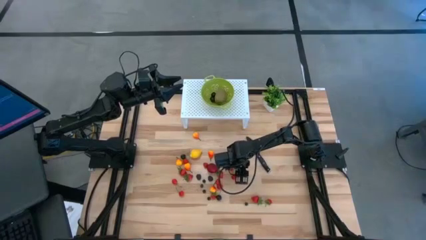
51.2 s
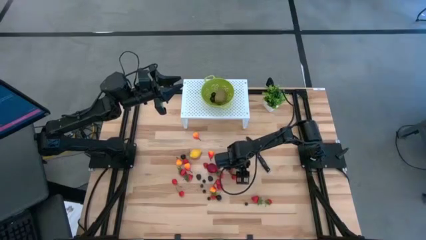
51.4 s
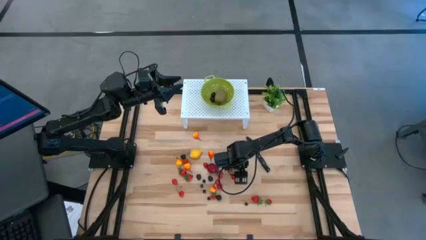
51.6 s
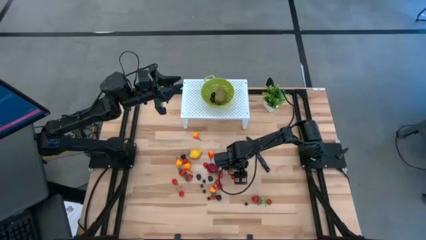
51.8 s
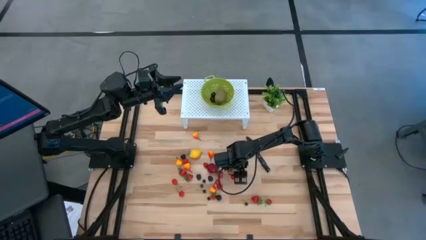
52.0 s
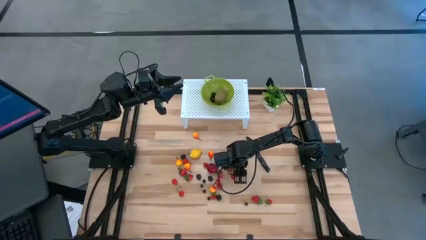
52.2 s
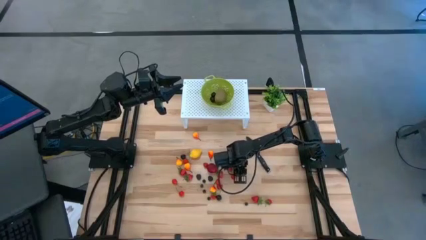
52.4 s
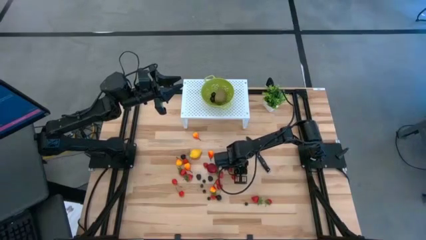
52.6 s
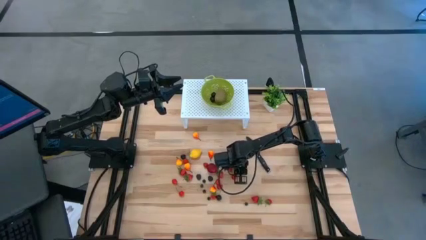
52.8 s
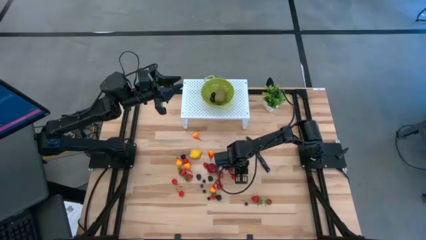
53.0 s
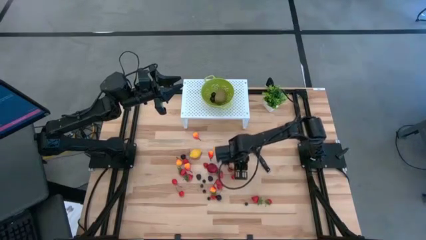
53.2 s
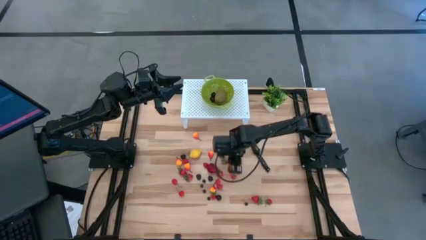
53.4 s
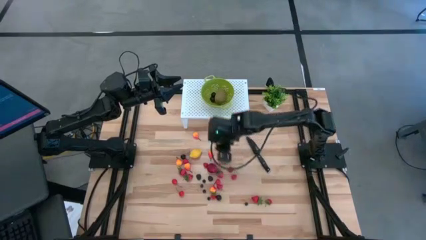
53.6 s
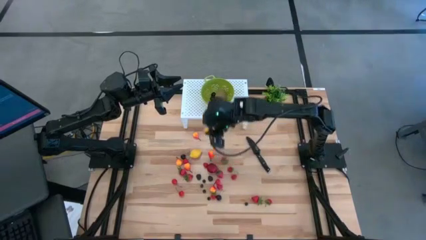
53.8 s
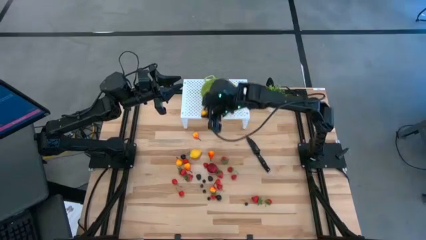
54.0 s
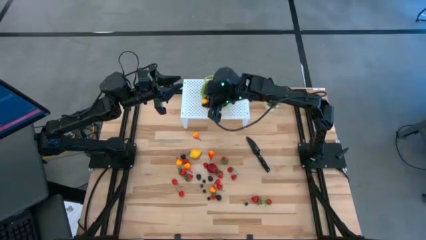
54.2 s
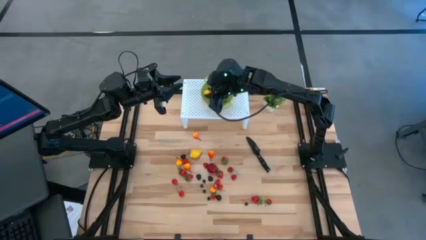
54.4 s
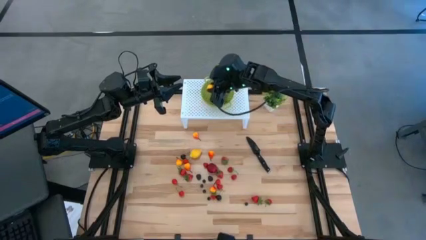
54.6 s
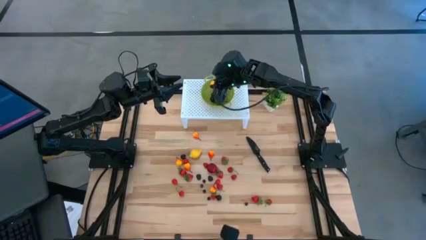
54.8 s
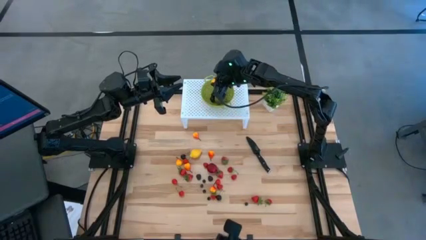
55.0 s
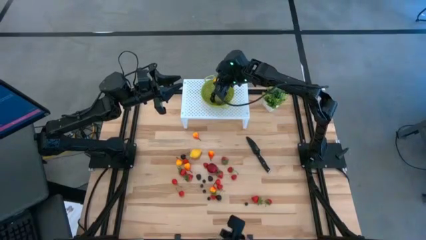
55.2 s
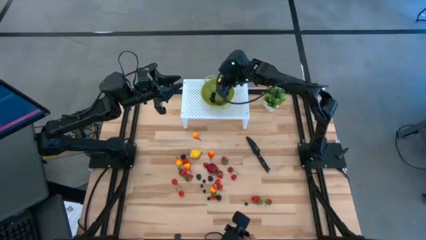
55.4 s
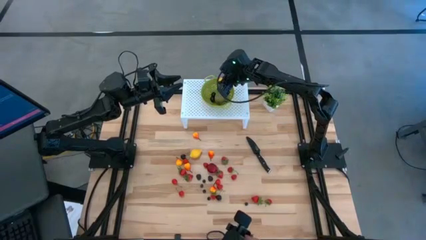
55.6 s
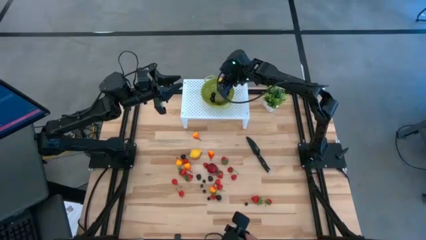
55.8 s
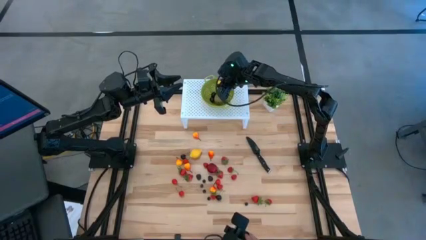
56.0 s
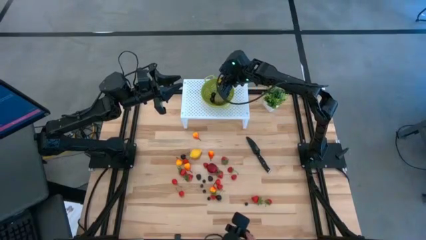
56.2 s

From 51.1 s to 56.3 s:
Task: Pick & Place Fruit
Put the yellow peach into the green strainer bowl

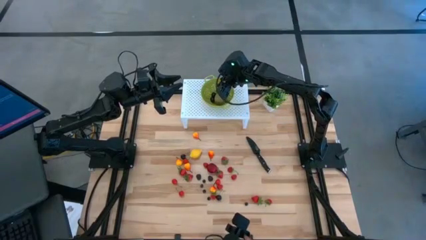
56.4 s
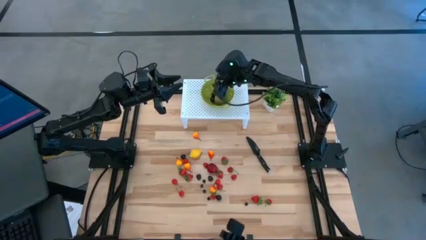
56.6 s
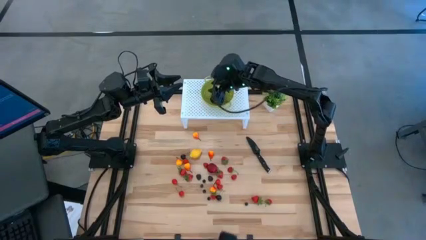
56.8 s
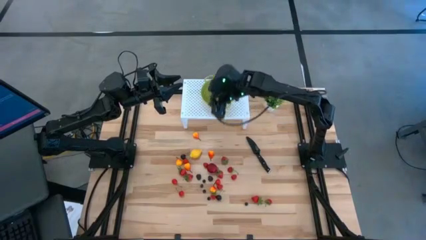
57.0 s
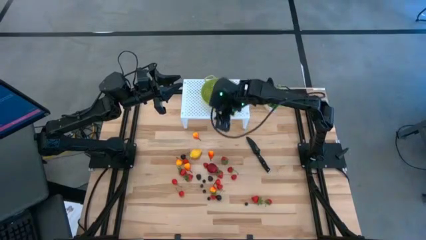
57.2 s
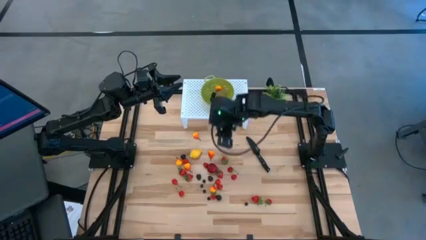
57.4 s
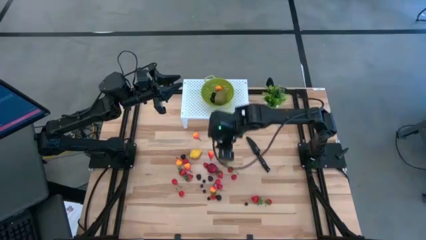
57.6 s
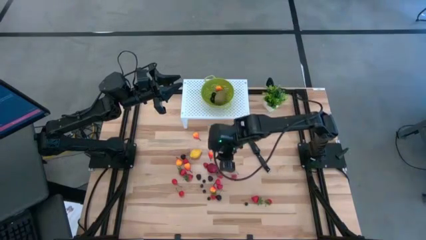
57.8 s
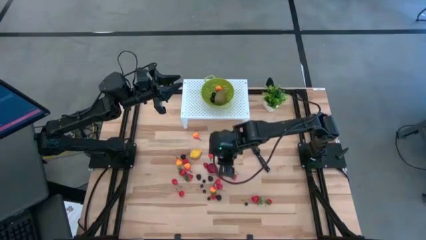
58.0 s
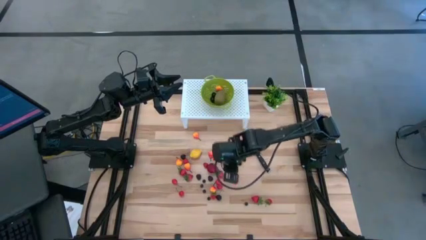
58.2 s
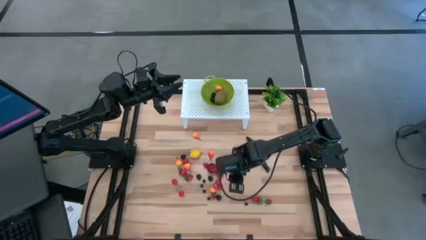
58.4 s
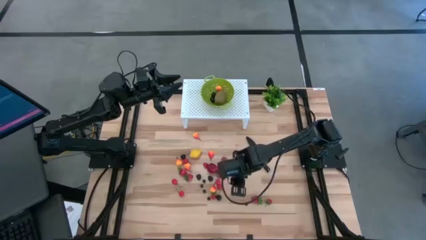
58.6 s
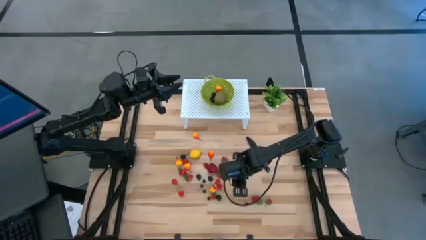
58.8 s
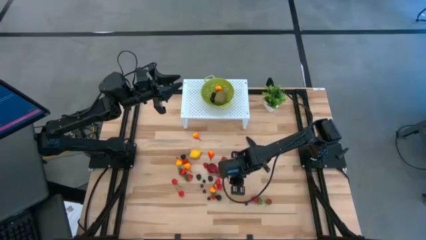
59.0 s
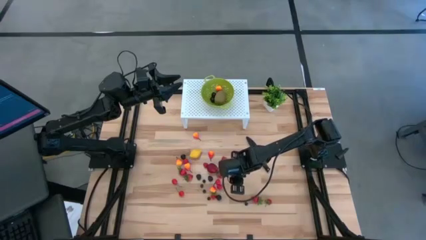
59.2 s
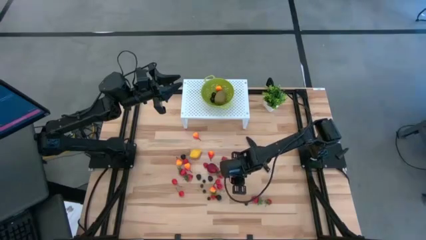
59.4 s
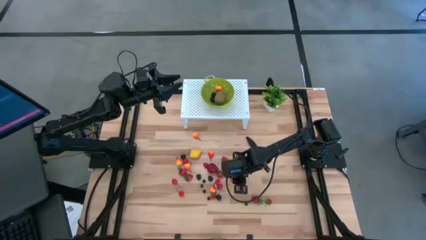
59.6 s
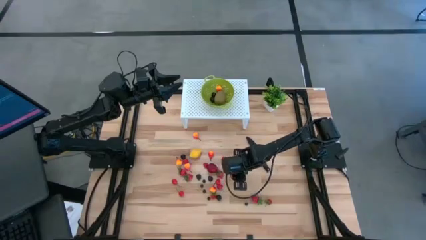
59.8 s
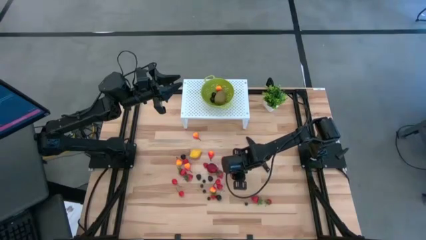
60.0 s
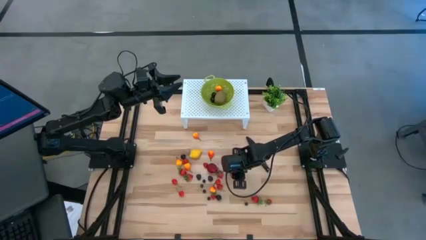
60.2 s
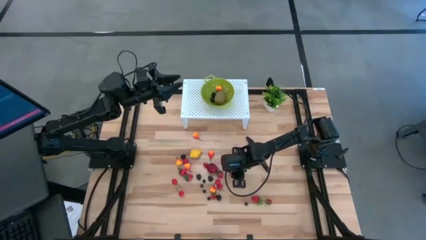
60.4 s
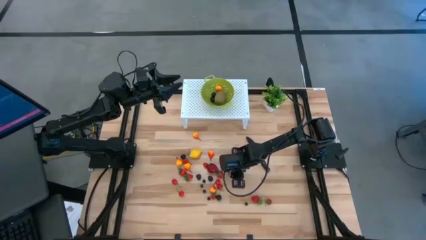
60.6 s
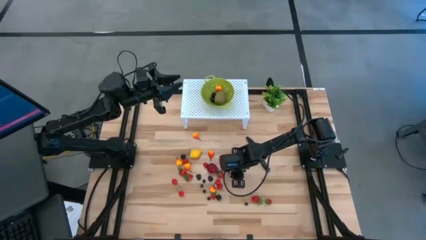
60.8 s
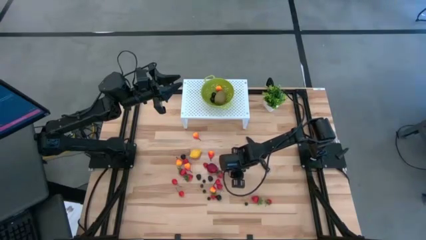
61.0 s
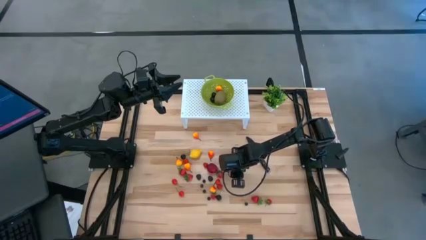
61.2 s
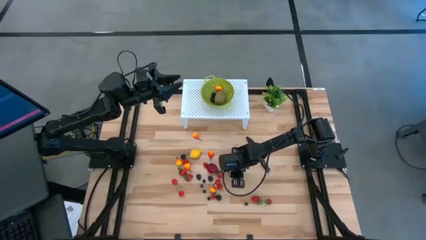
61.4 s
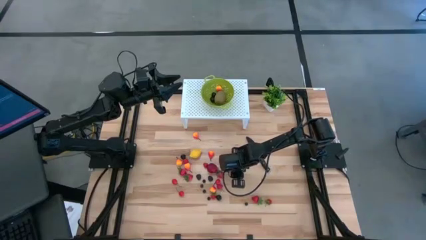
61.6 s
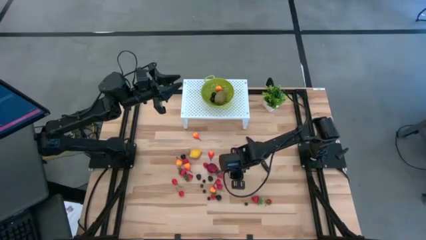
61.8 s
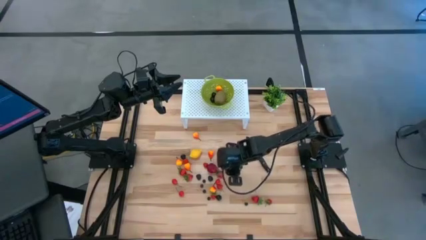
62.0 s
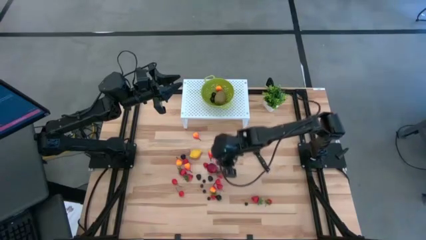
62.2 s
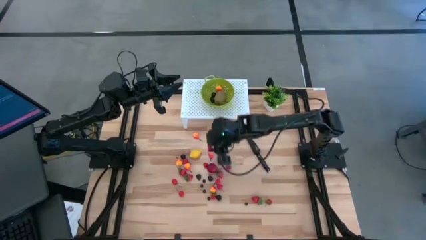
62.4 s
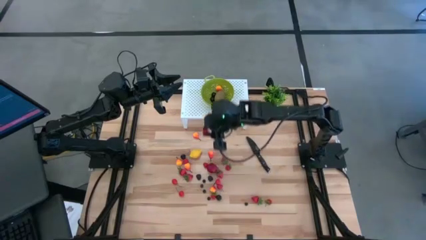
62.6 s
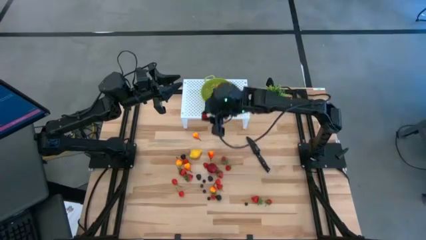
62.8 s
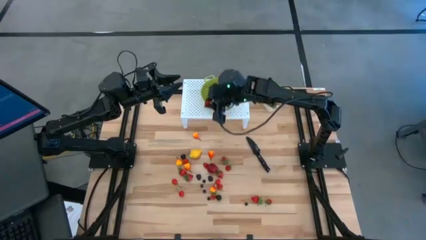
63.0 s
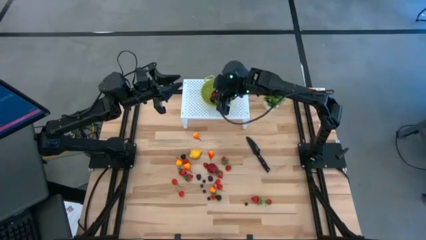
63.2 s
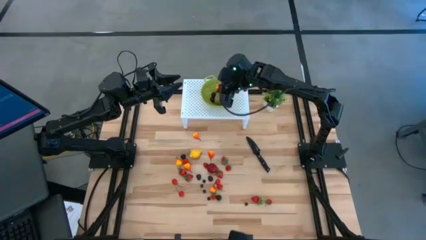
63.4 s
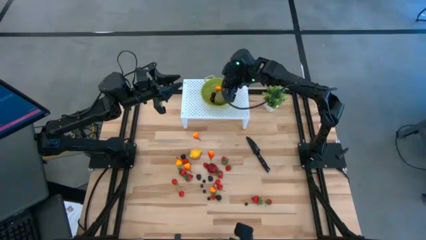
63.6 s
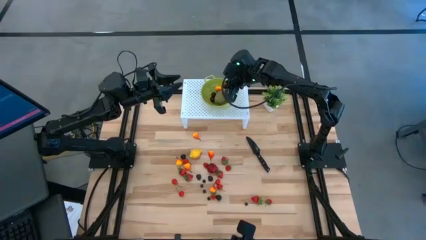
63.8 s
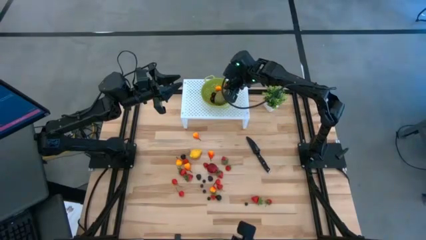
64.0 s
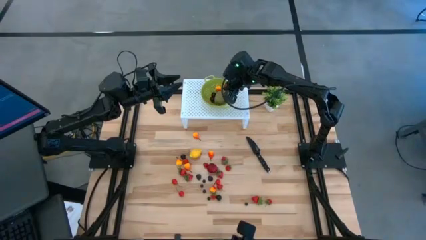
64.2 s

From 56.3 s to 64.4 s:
Put the red raspberry into the green strainer bowl

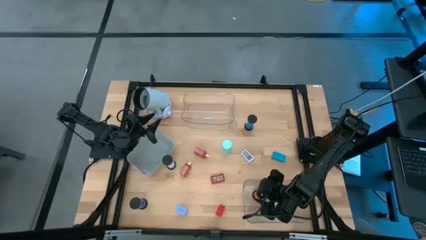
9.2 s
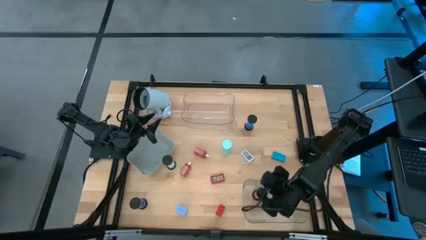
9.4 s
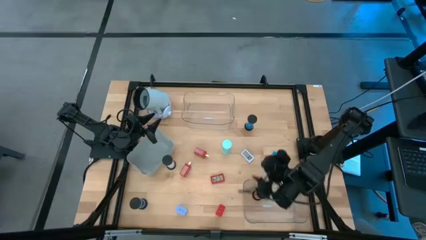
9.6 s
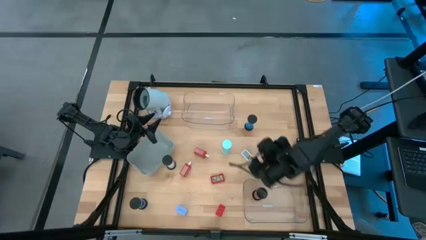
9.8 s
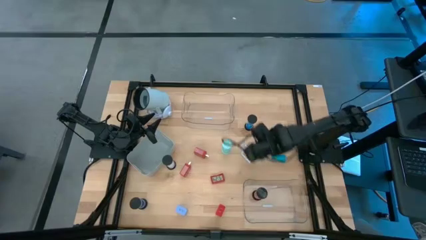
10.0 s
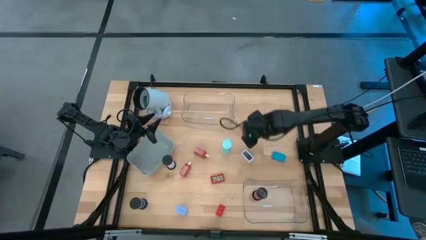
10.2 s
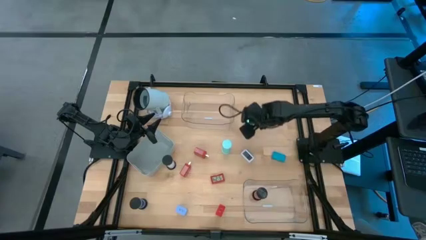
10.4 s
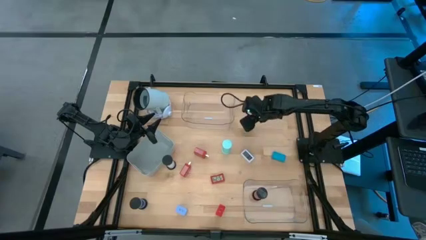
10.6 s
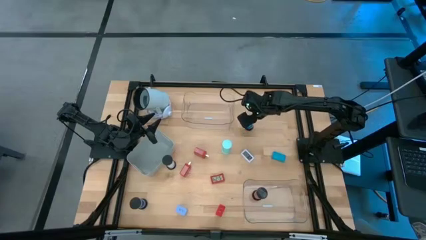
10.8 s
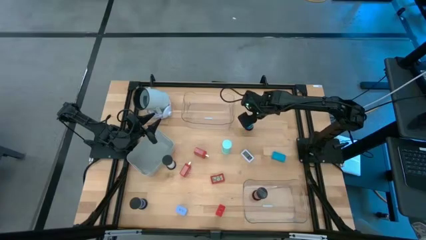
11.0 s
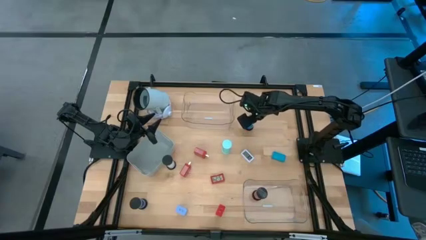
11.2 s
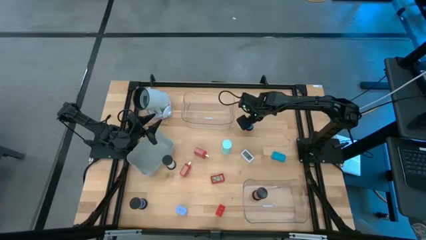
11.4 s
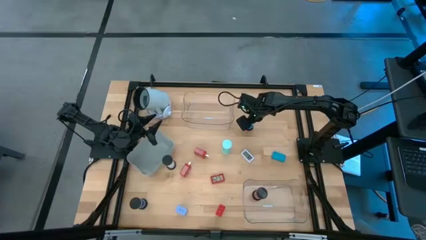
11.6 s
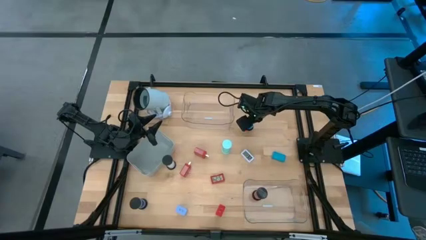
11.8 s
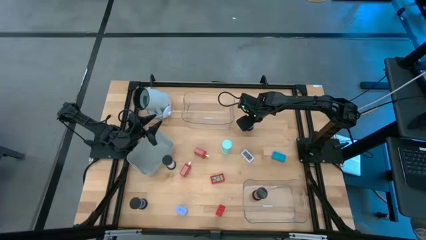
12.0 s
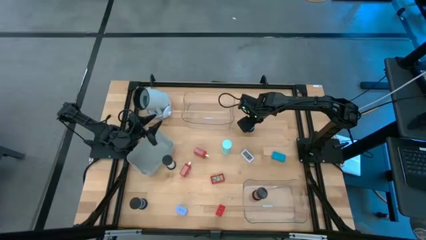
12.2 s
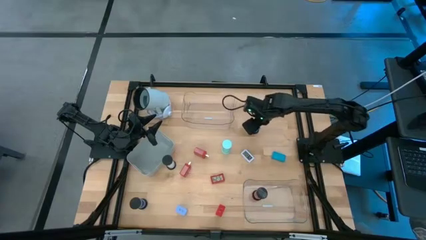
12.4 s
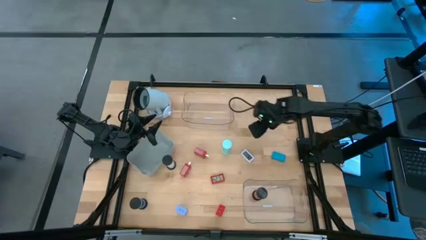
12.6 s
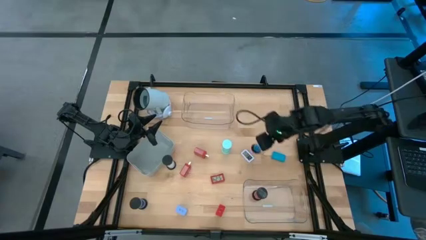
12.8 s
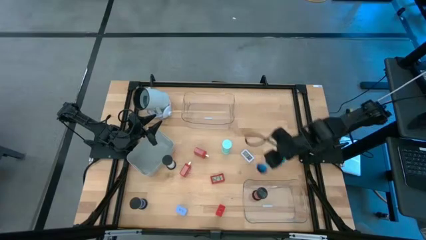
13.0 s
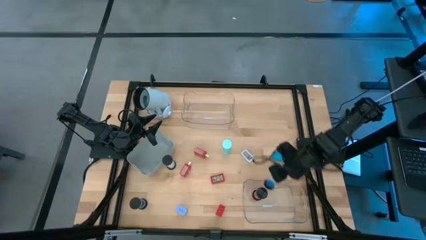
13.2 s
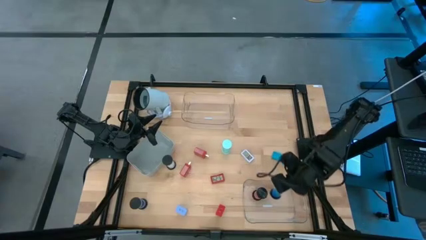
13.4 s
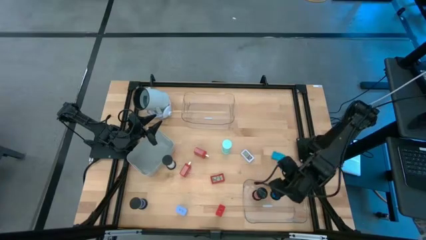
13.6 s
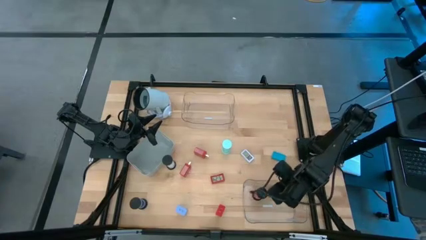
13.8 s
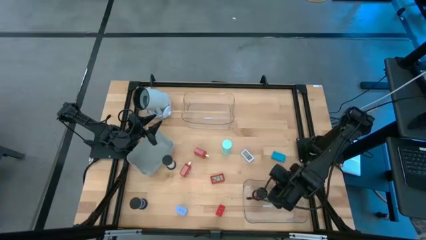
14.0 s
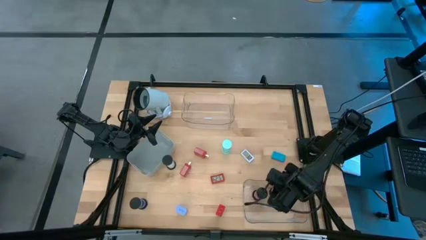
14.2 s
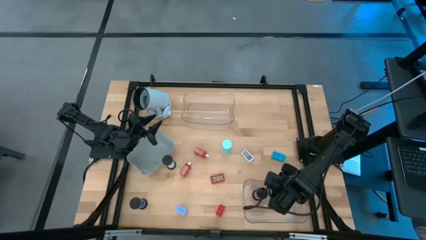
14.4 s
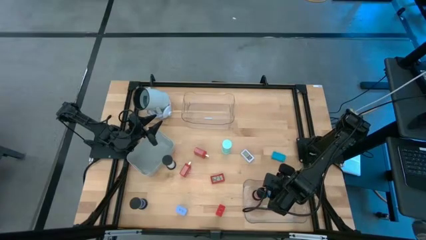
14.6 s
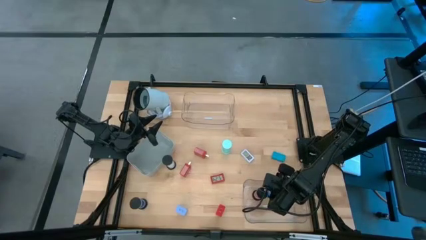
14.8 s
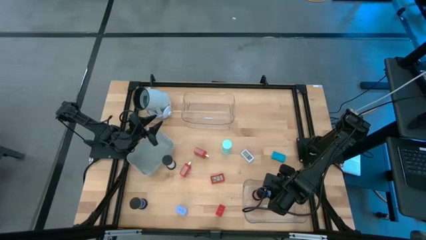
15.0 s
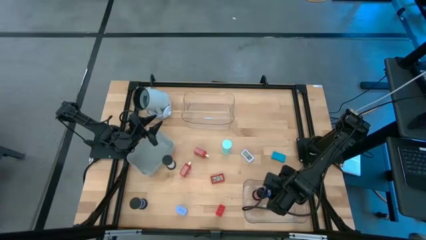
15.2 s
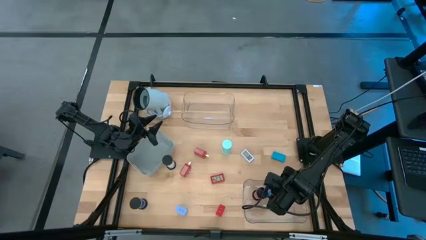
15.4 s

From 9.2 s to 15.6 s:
Task: Pick & Place Office items
Put the top dark blue hourglass into the bottom transparent bin
